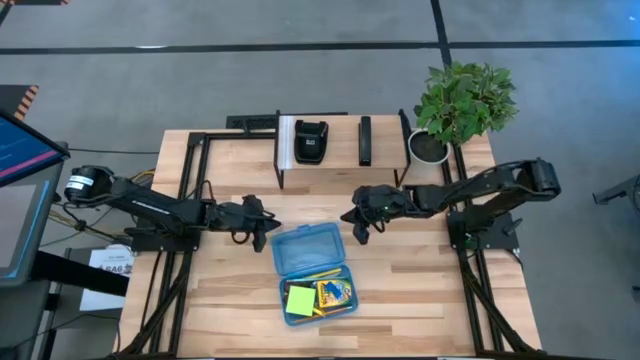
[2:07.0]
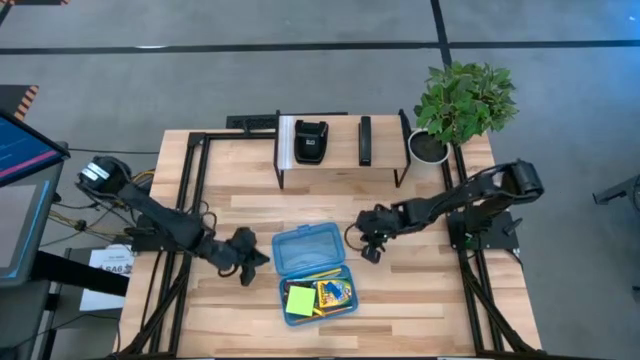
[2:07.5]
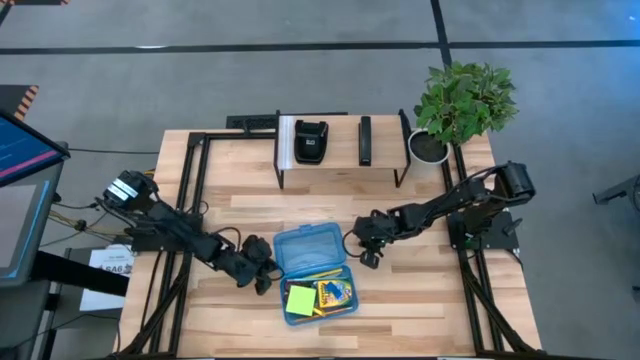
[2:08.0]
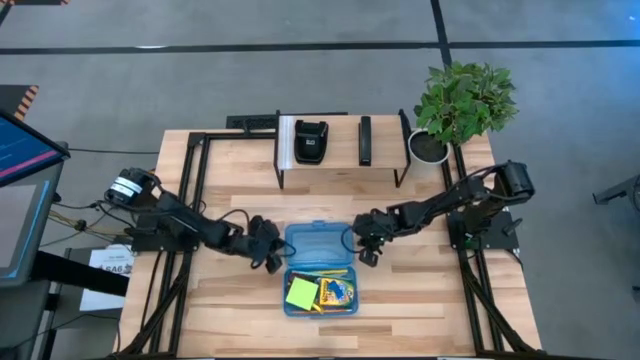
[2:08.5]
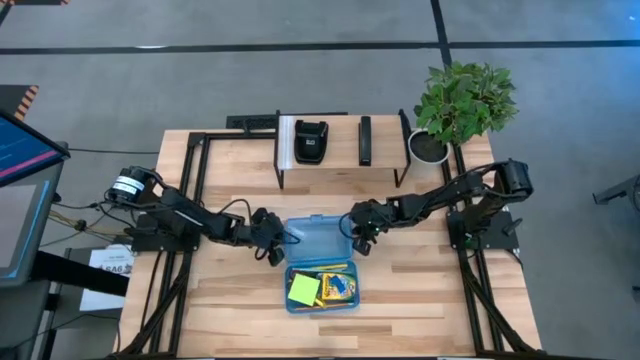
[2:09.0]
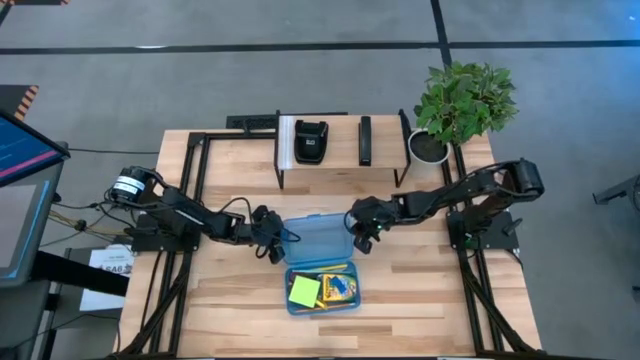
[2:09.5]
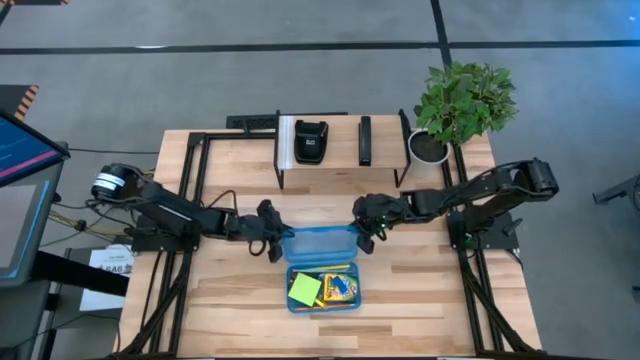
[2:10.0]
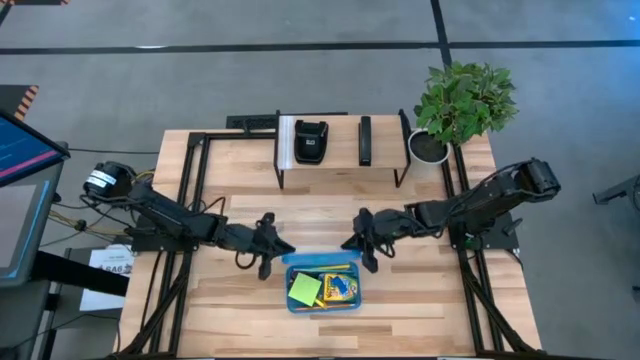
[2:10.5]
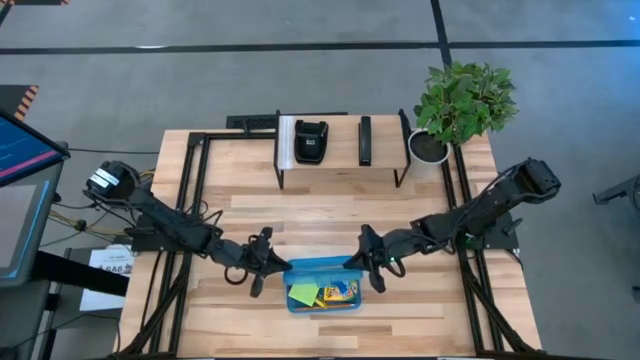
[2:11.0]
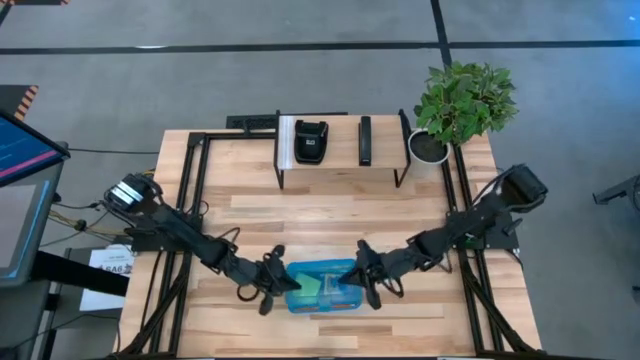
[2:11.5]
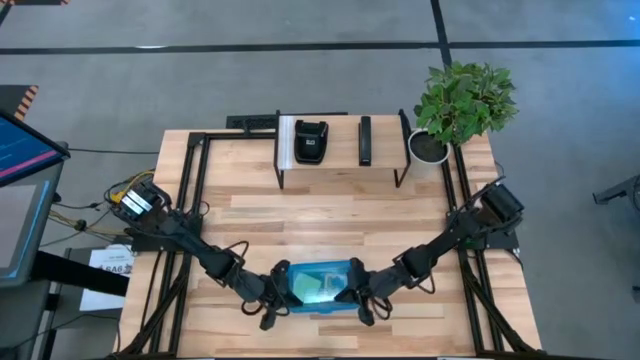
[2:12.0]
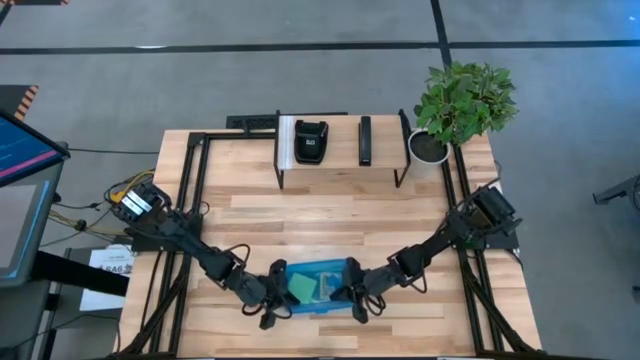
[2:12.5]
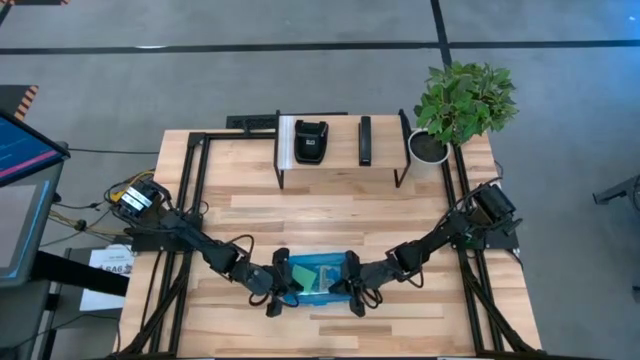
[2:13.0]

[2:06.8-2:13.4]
Task: Pack school essentials
Close the blue supply box

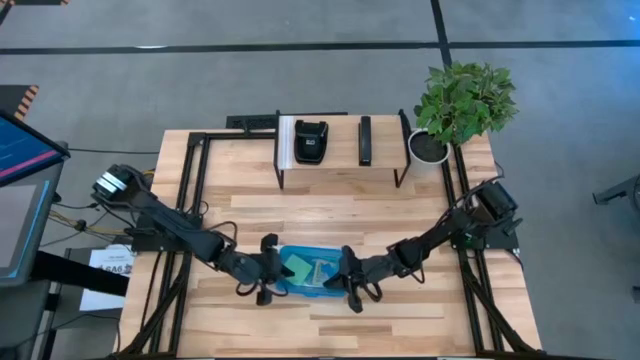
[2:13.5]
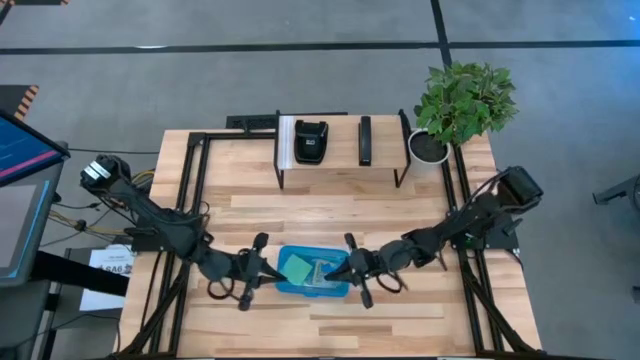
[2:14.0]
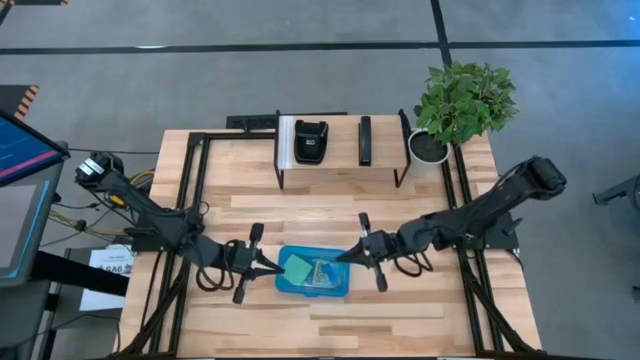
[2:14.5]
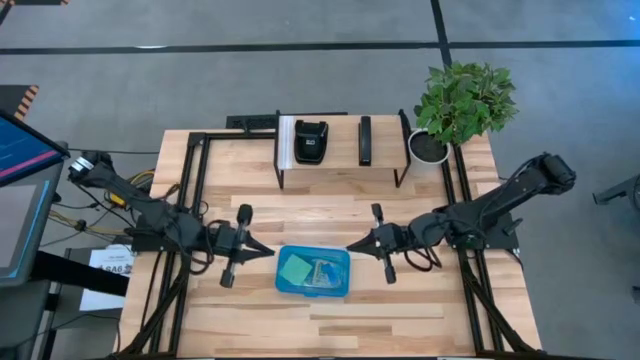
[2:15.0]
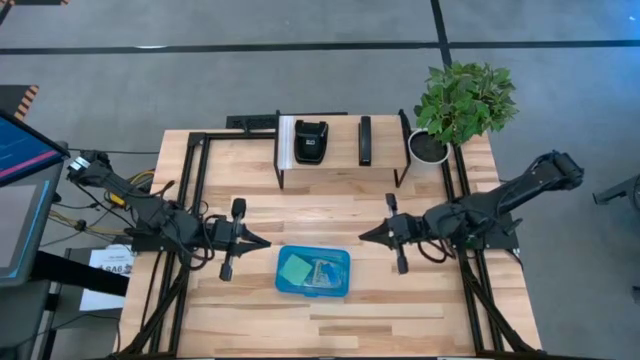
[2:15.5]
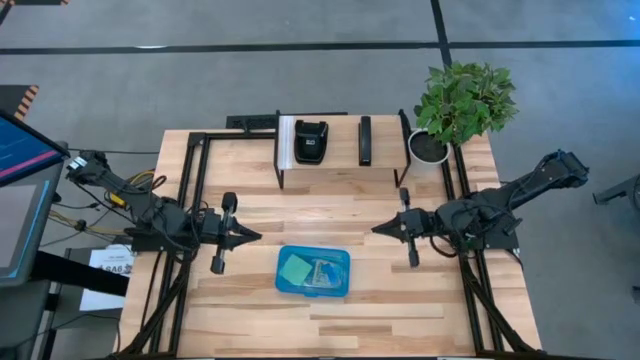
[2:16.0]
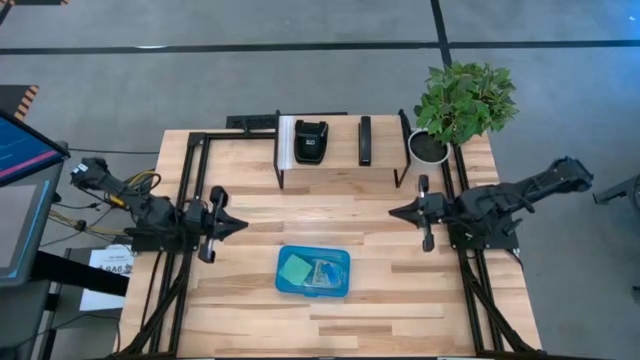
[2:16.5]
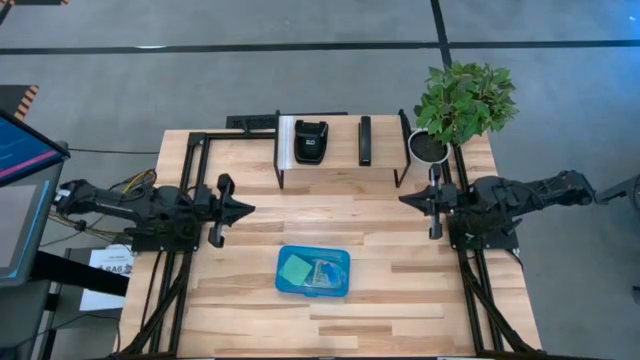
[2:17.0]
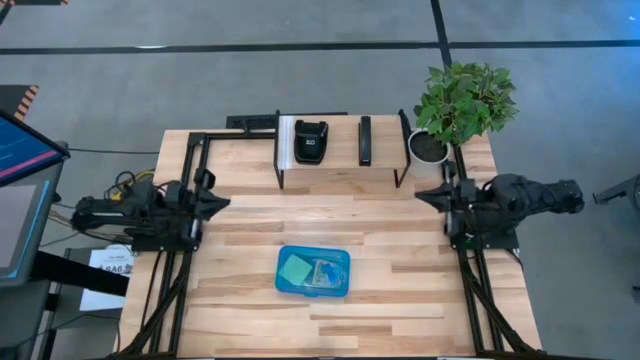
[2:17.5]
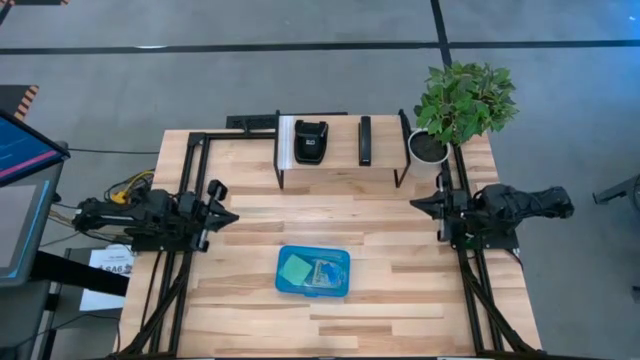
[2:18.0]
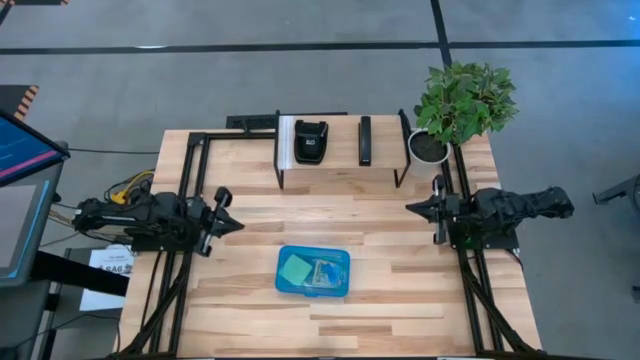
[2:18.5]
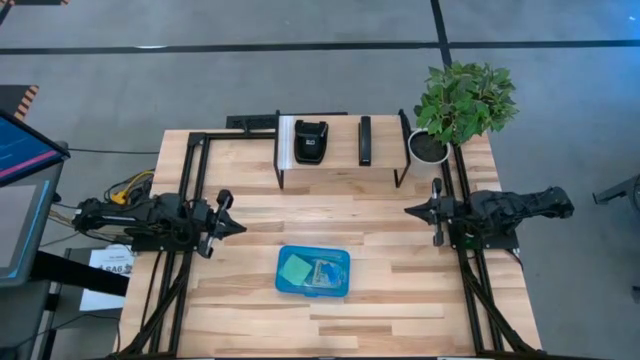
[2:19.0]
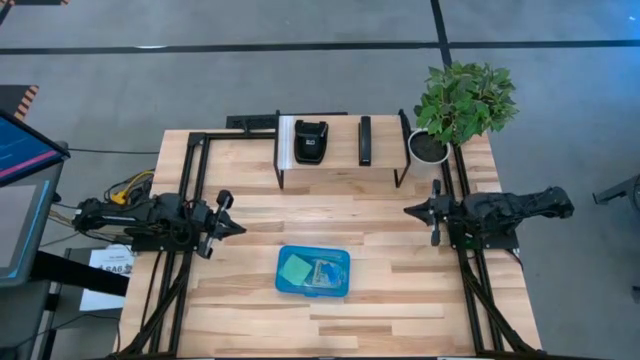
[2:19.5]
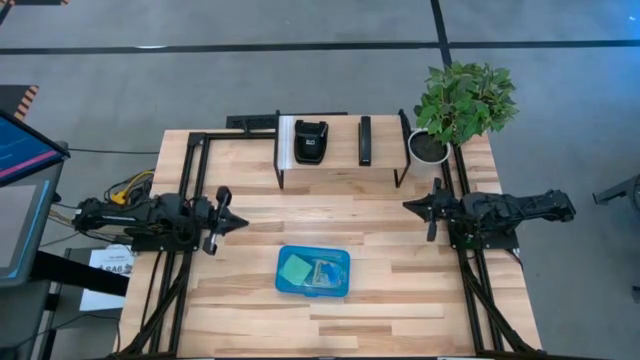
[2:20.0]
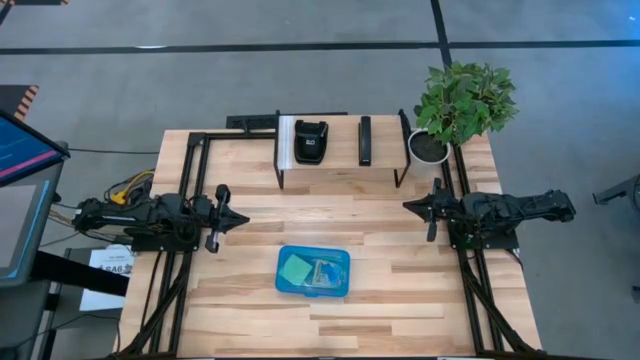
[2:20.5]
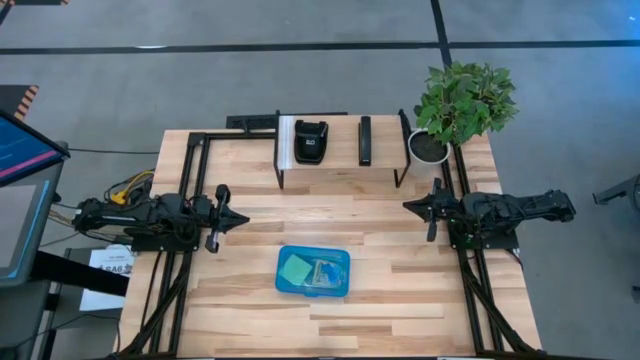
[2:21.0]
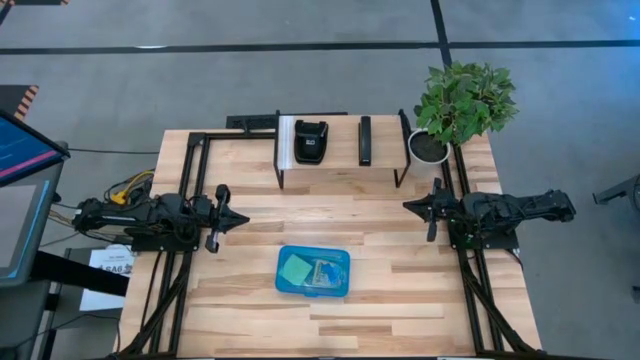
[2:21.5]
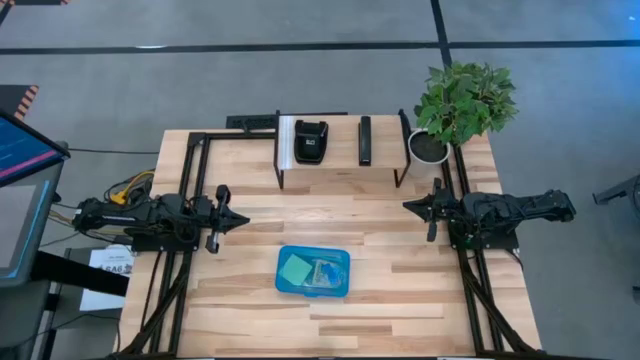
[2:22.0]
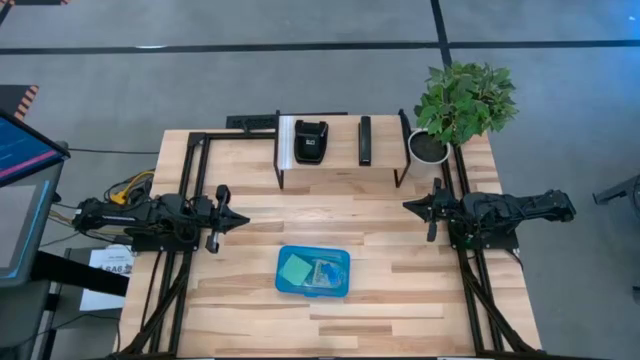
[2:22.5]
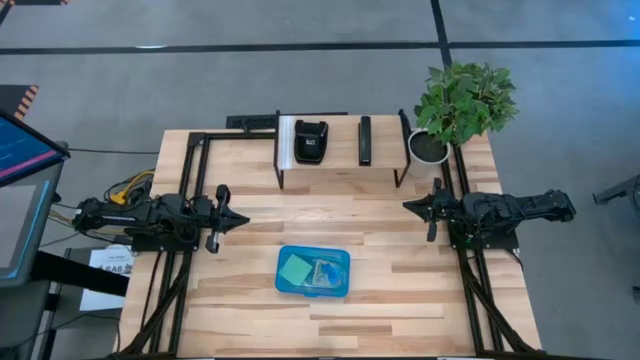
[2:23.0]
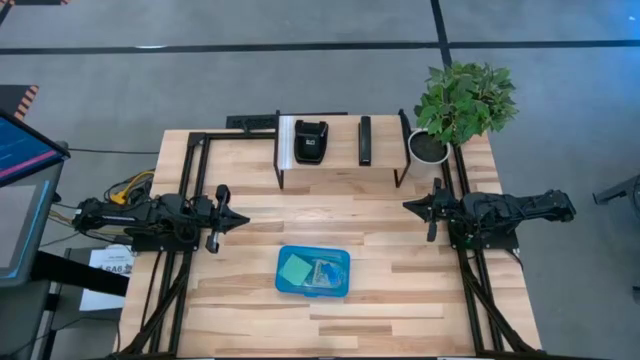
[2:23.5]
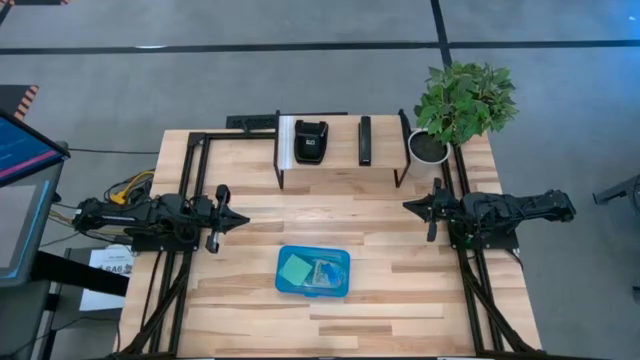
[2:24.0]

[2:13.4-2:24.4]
Return to Home Position

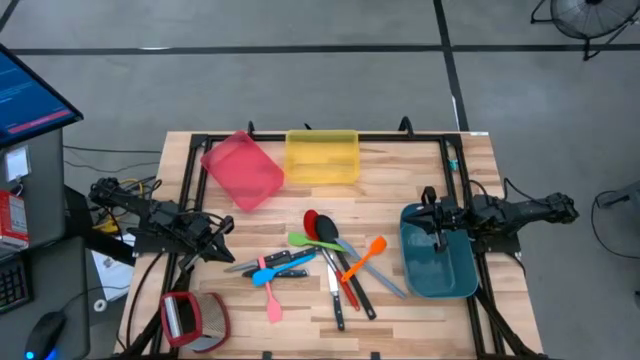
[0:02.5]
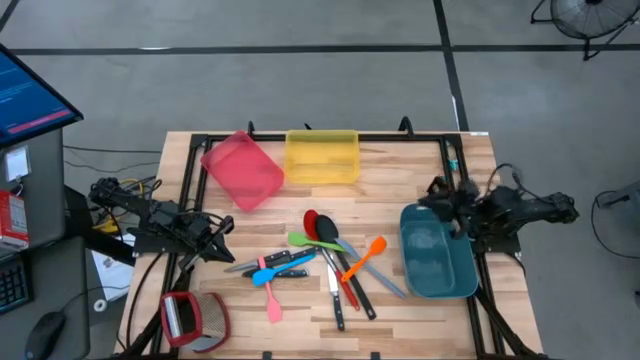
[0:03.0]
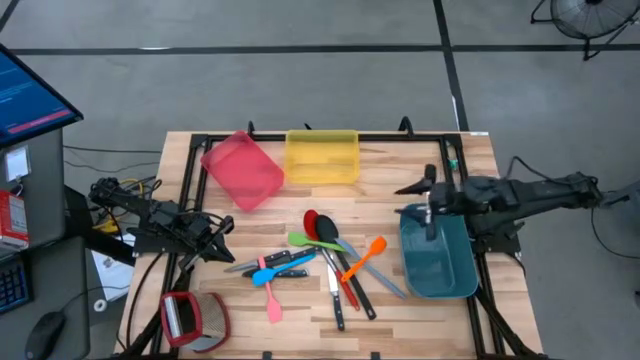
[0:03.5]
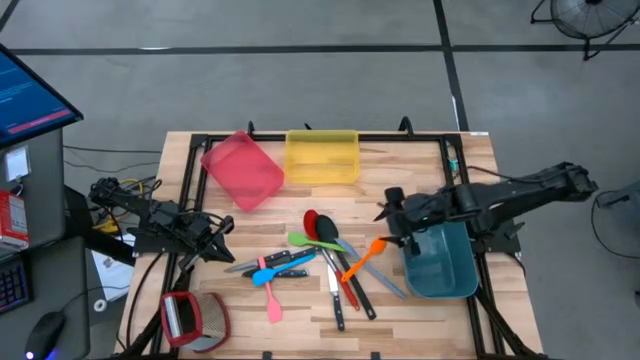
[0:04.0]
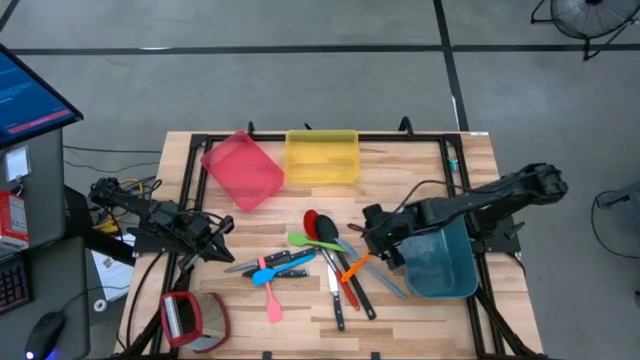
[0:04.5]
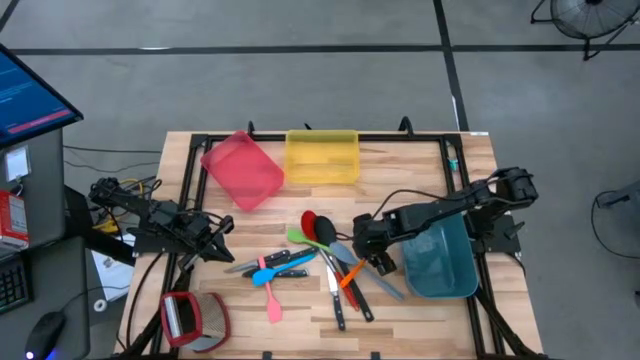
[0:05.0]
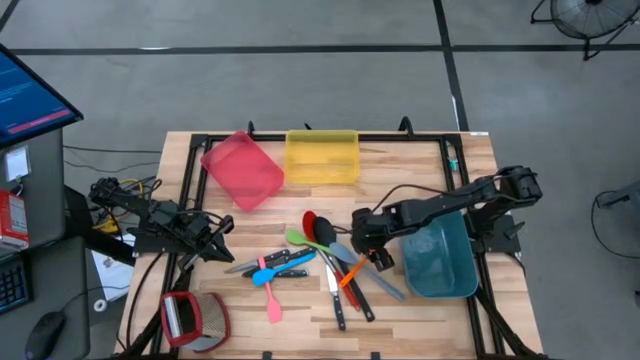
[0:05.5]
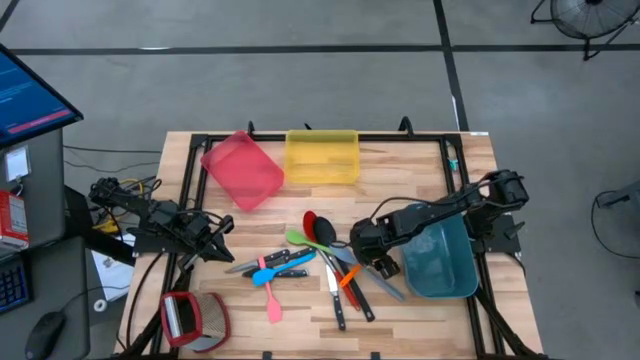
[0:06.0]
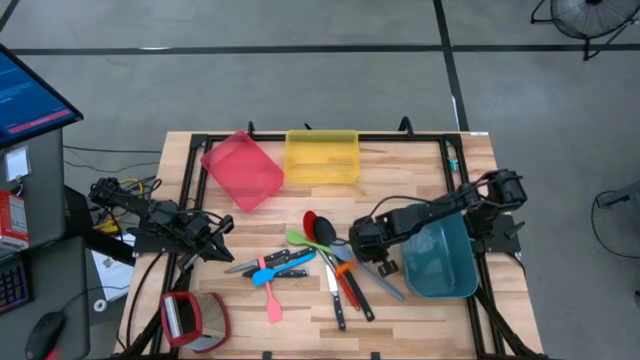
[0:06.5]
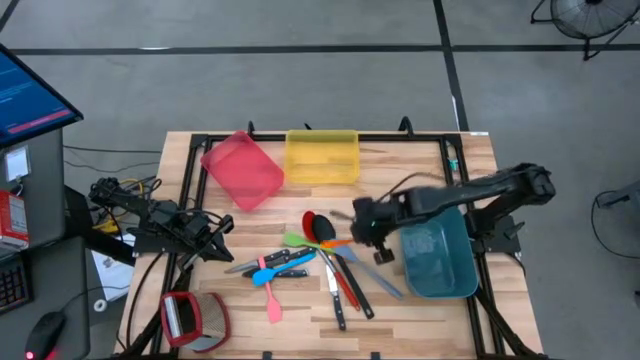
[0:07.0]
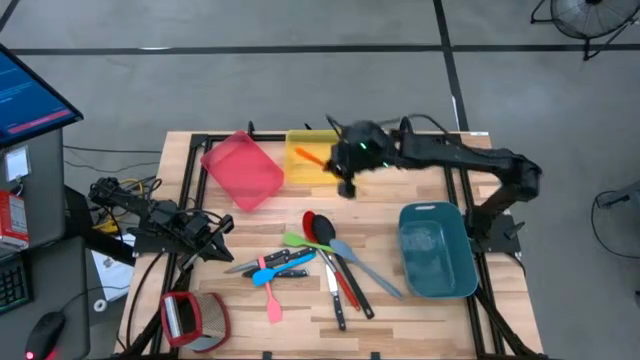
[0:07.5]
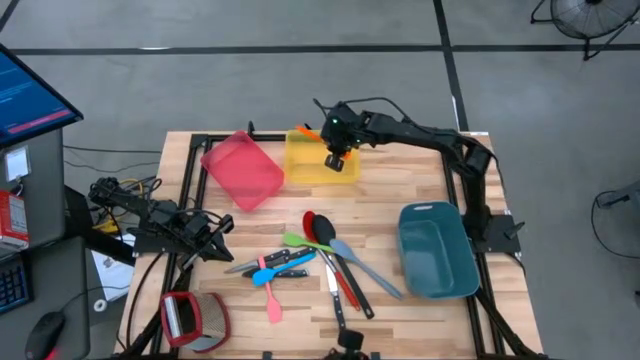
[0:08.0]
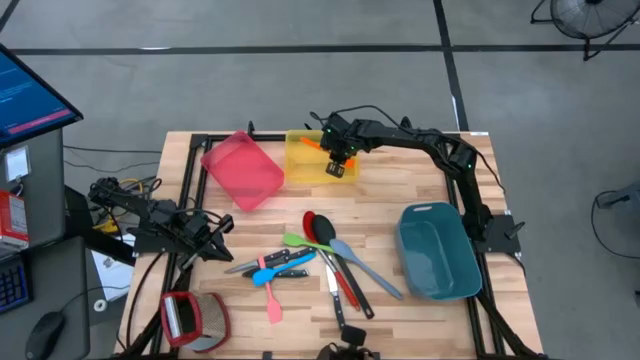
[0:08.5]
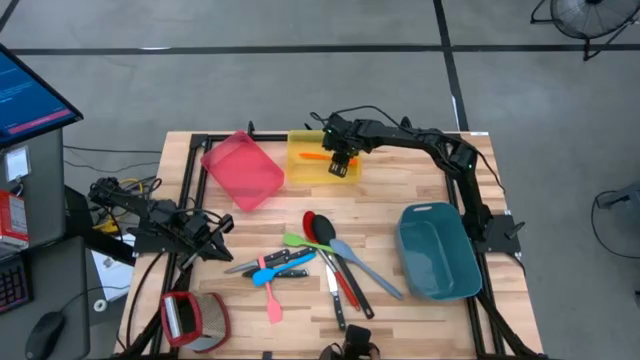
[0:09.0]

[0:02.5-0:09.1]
Task: Pick & Place Kitchen Items
Put the orange spatula into the yellow bin
